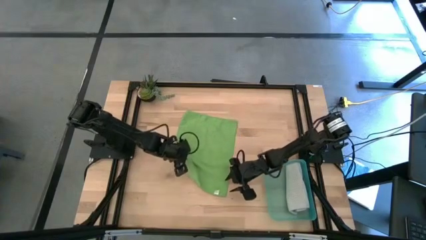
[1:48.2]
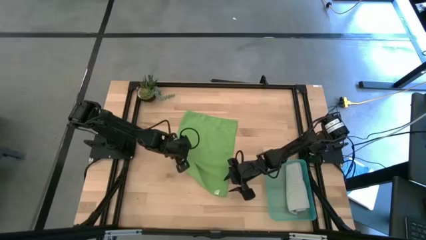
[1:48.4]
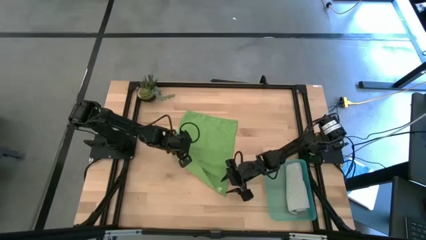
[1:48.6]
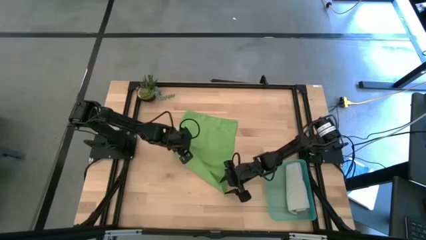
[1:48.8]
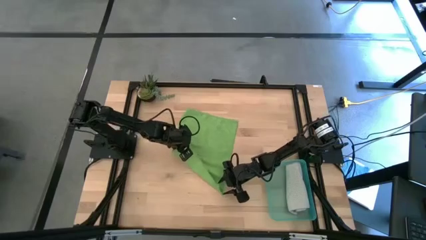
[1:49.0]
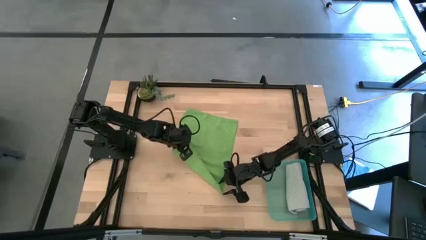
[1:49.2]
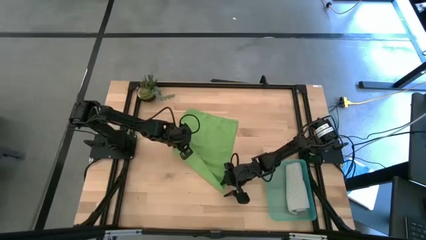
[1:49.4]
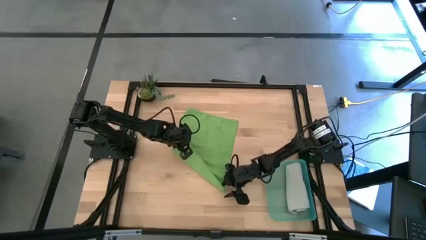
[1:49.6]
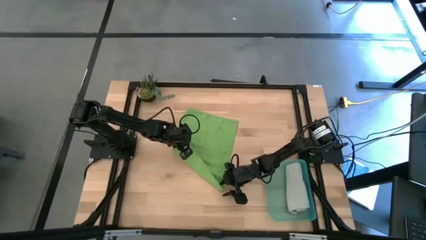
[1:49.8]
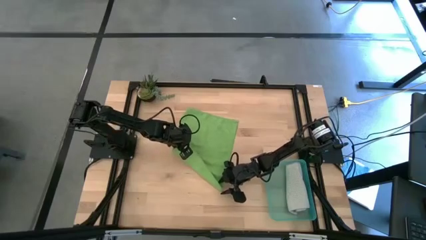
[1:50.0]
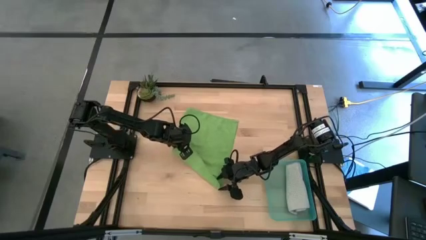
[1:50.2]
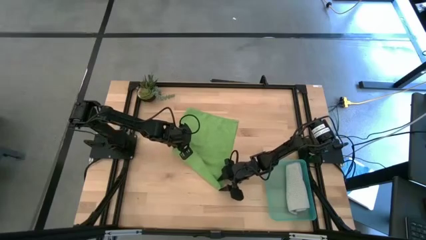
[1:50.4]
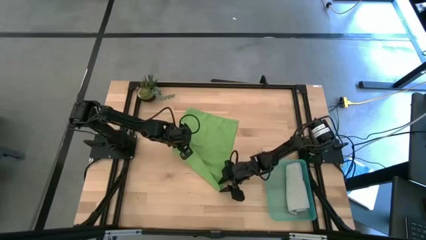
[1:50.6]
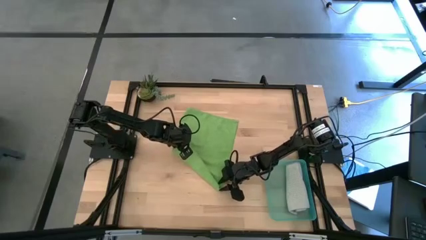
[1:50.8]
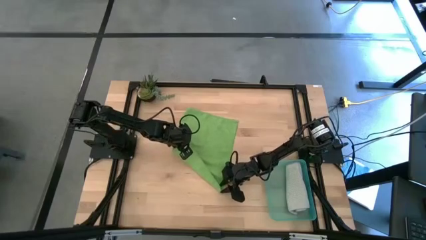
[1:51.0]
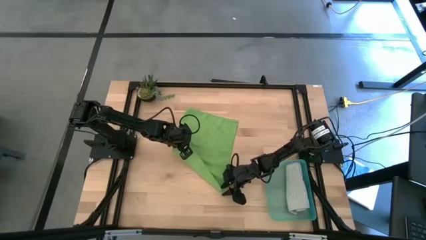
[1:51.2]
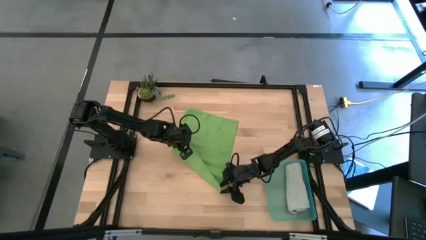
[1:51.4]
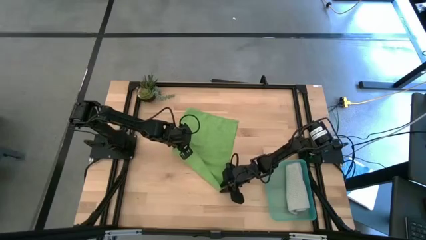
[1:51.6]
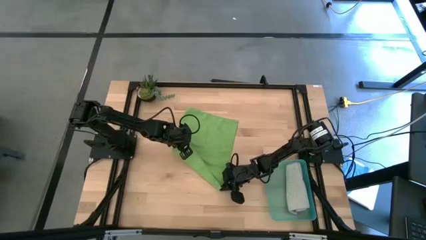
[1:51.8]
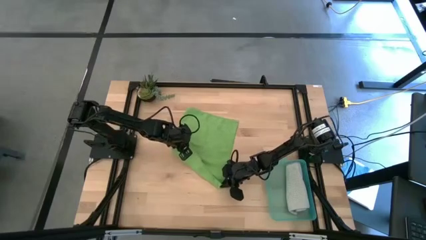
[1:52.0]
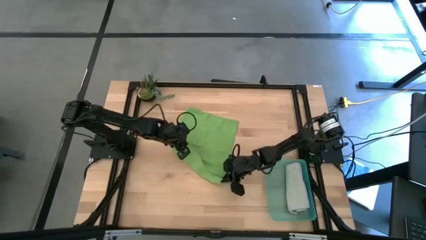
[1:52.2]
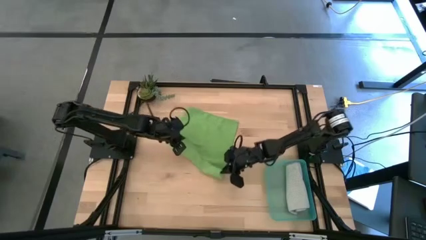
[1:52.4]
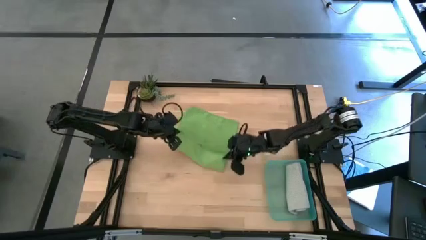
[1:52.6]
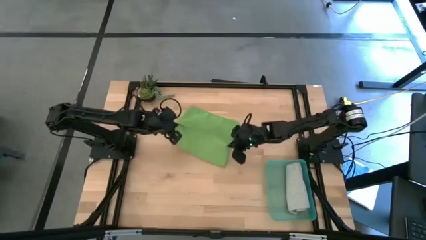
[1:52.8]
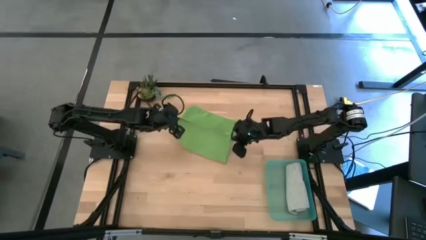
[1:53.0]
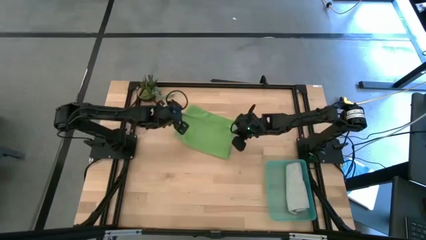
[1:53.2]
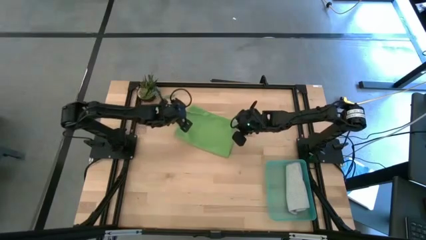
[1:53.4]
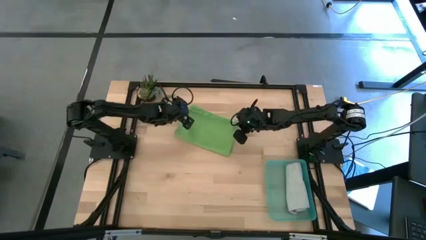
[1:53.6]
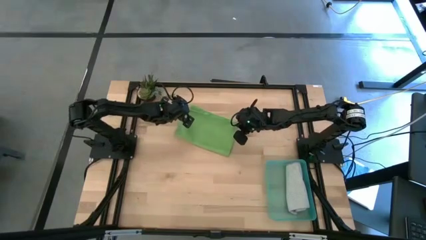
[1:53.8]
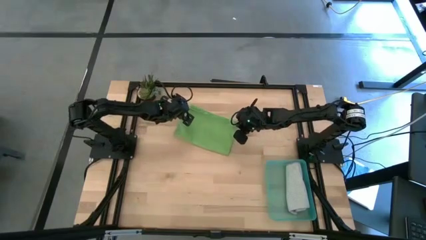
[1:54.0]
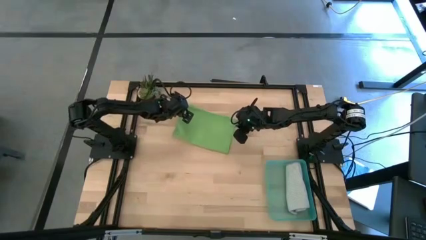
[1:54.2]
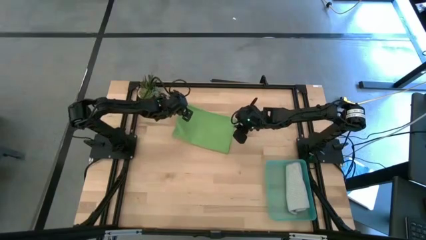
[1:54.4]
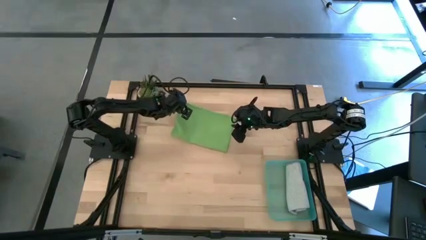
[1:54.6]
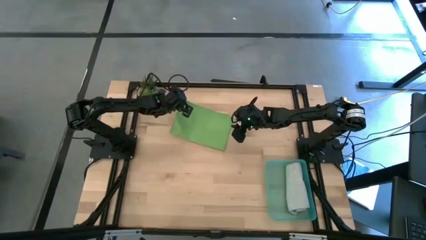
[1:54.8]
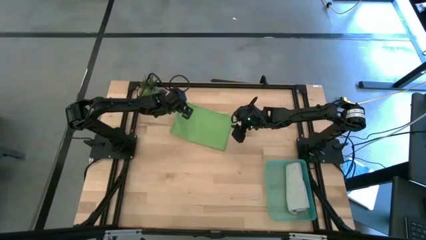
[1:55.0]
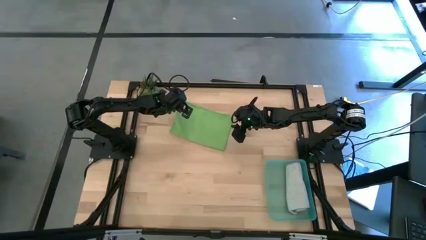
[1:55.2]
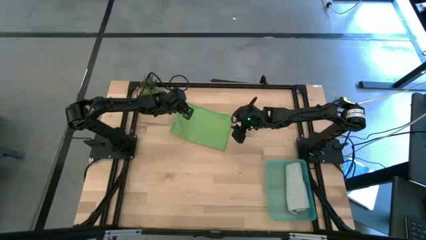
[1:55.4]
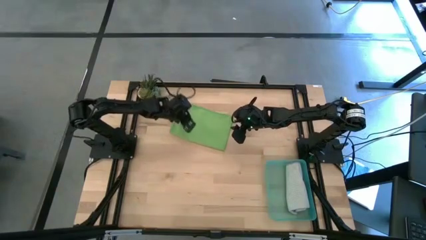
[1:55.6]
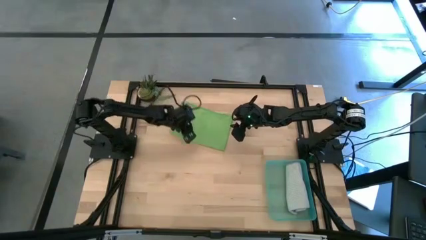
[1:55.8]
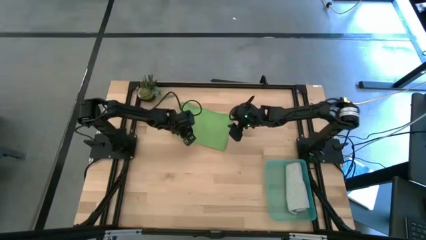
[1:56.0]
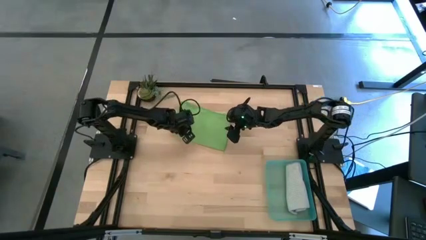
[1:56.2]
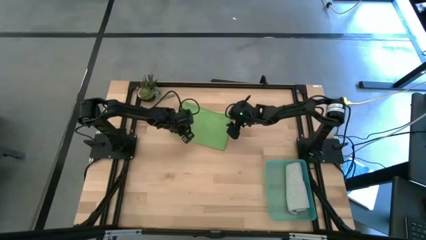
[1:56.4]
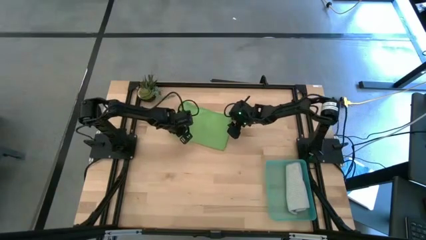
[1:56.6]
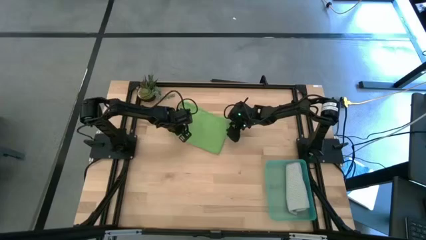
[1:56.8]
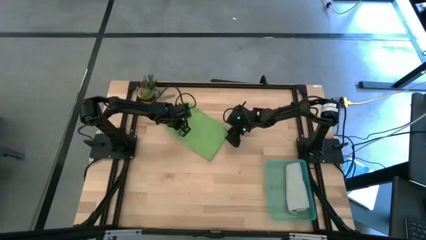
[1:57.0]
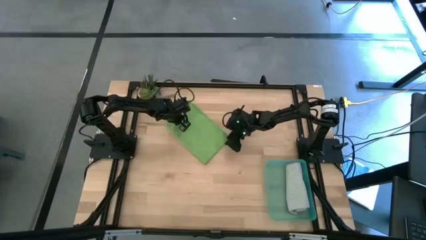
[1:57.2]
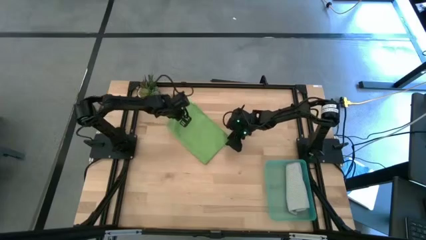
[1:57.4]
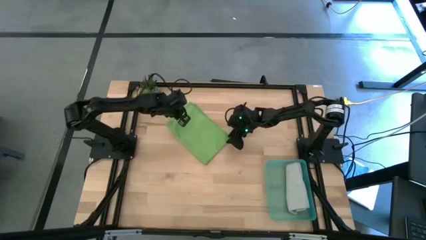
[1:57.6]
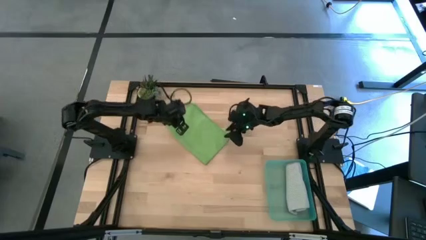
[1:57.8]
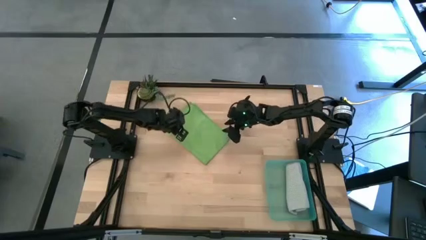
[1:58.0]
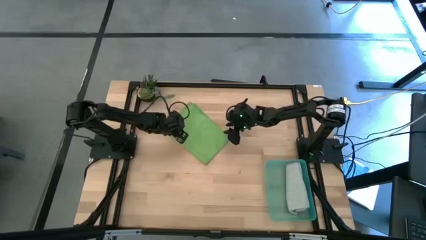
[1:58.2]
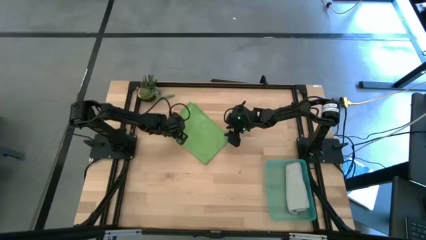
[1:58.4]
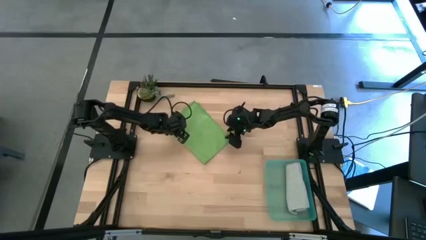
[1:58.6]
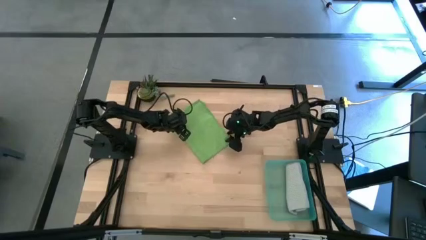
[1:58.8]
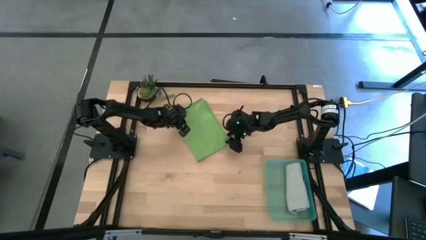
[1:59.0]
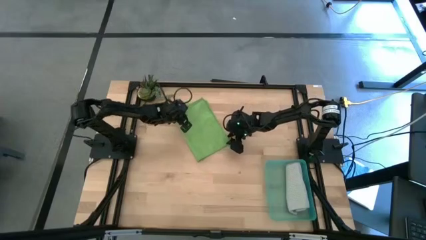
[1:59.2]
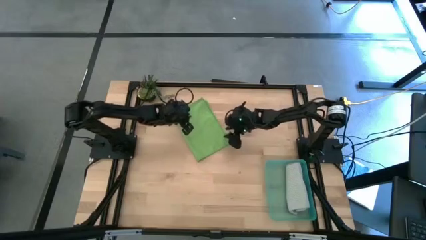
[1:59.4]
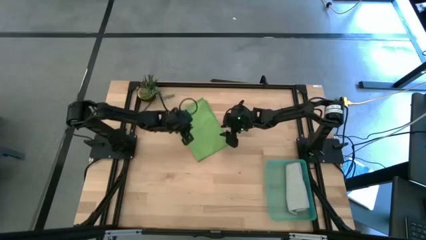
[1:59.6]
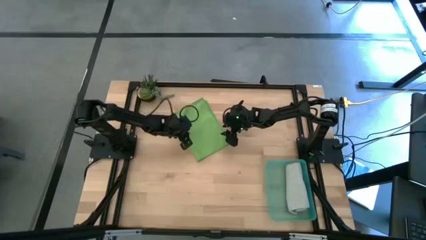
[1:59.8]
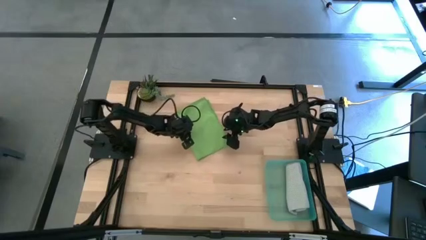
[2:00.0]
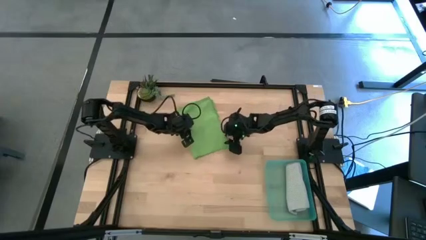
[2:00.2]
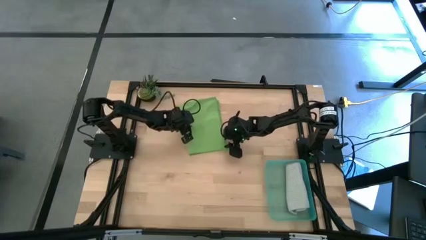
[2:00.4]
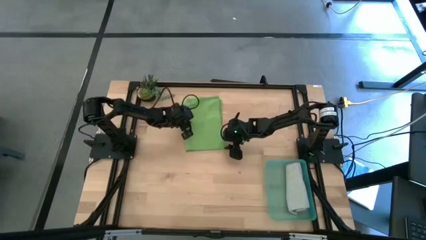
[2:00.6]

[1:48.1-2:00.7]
Task: Roll microfiber towels into tight, uniform cylinder then place into a basket
Fold the green microfiber towel

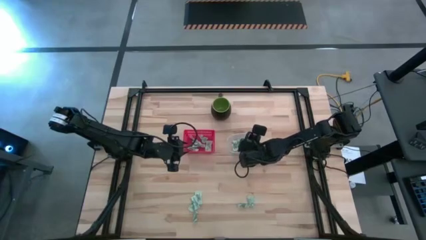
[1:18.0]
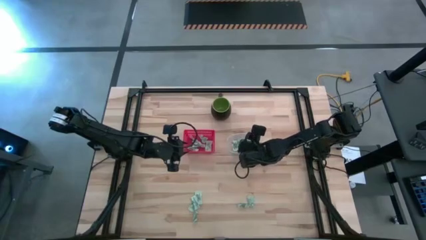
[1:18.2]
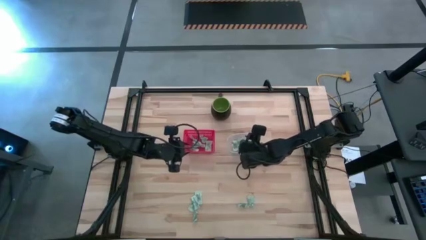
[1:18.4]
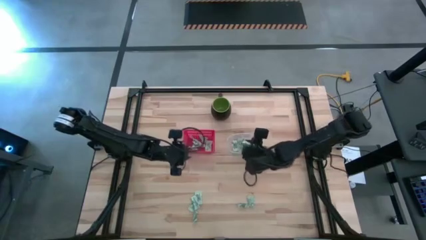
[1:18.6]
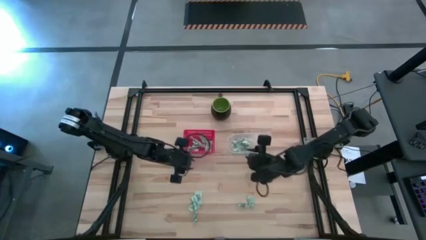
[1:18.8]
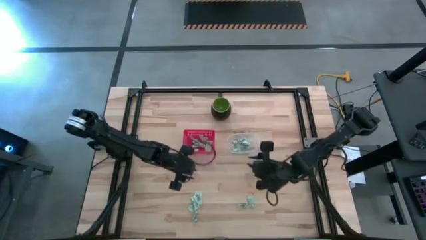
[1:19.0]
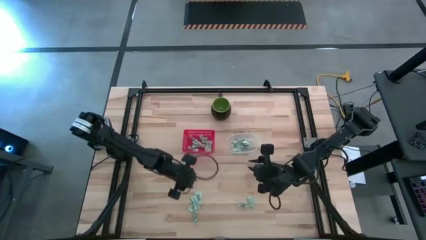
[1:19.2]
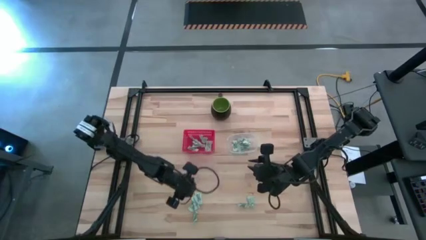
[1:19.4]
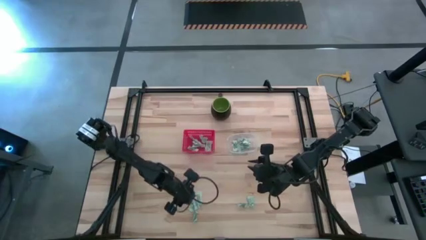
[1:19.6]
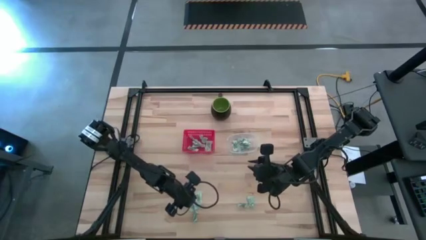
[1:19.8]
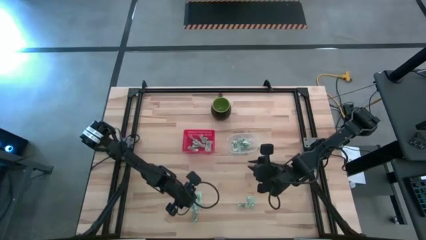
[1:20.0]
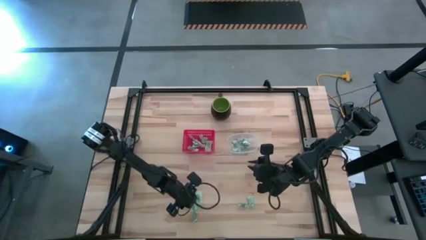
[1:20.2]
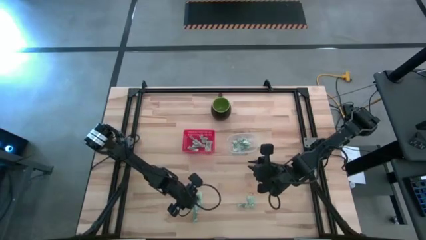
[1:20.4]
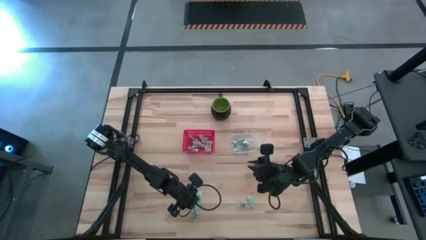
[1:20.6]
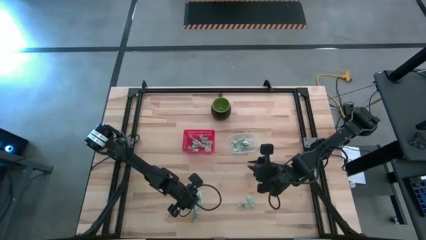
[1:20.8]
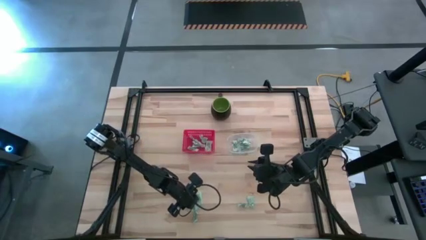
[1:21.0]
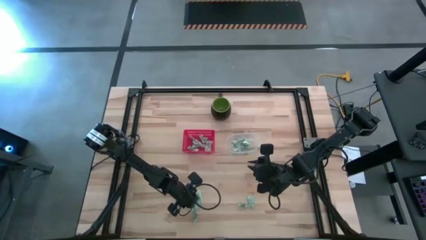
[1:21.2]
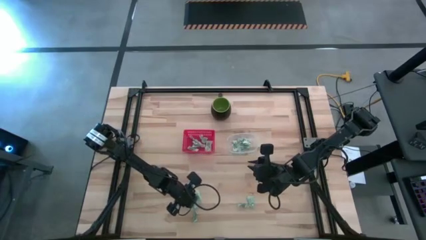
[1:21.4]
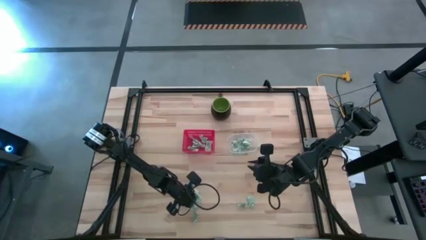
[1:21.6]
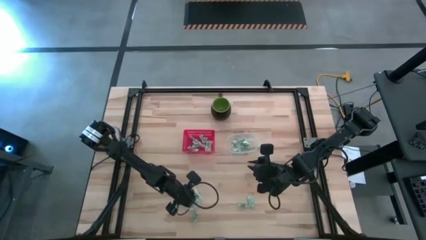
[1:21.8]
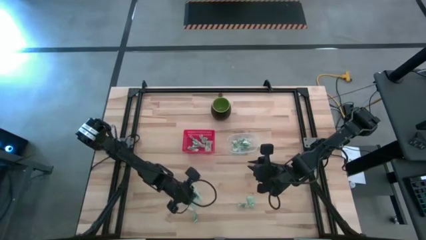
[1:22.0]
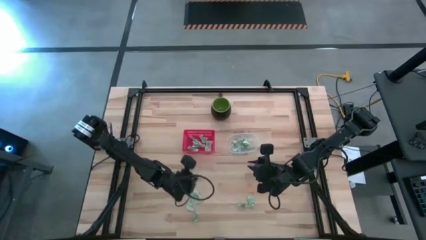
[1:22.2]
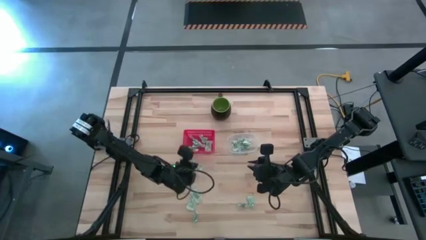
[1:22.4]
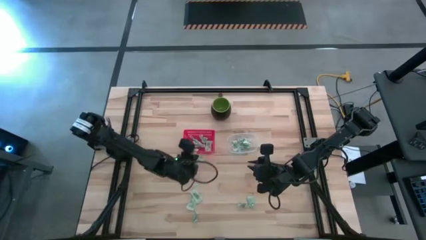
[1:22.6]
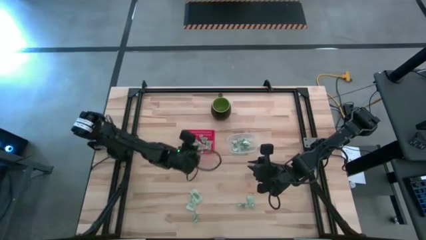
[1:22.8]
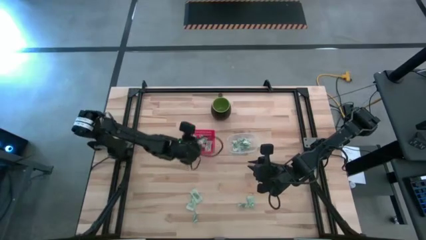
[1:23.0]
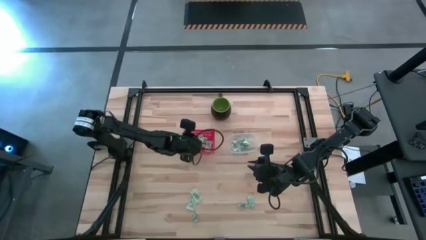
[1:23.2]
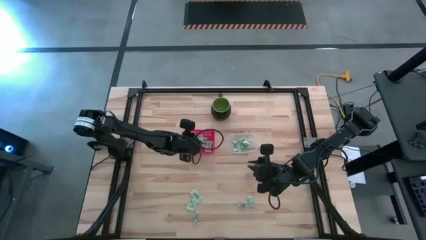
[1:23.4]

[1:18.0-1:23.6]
Task: Pick and place items into bin
Put the stevia packet into the red bin
